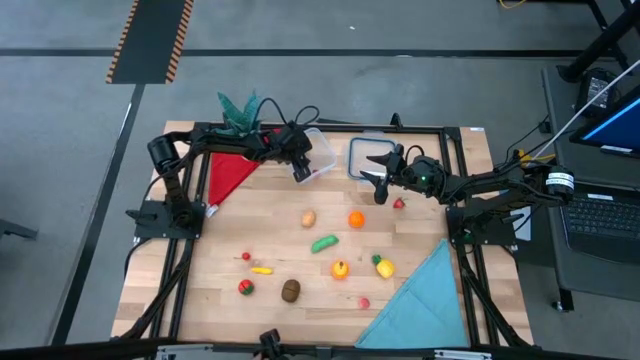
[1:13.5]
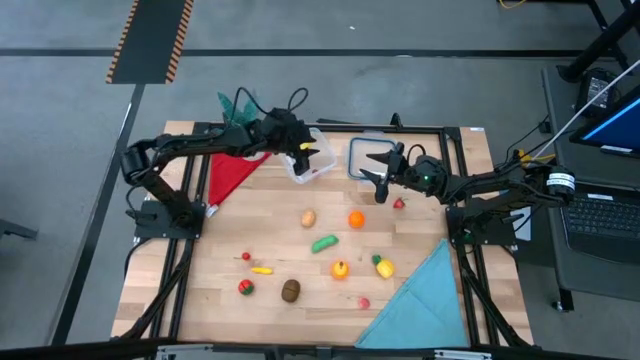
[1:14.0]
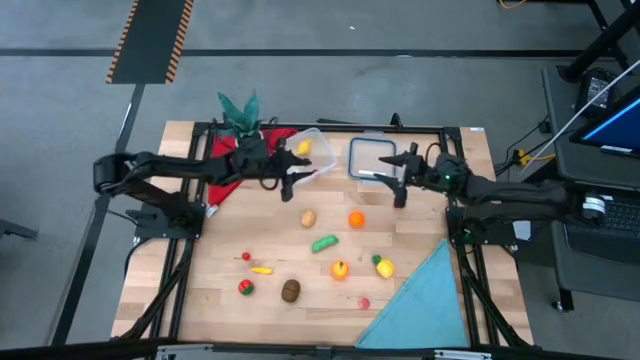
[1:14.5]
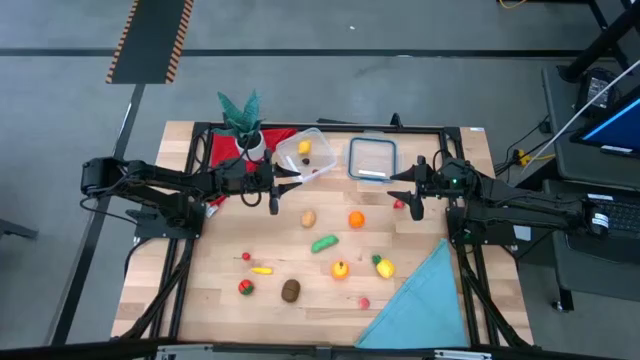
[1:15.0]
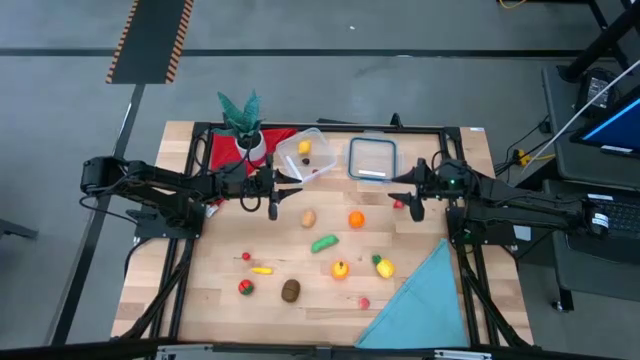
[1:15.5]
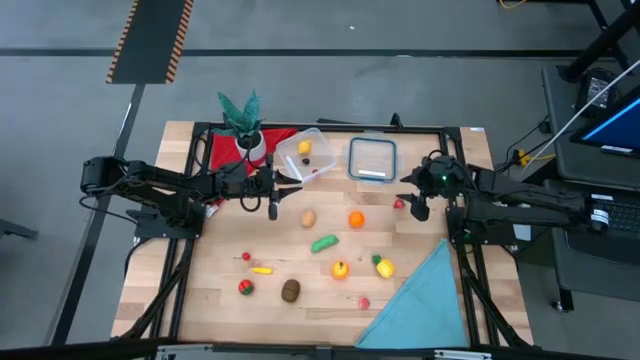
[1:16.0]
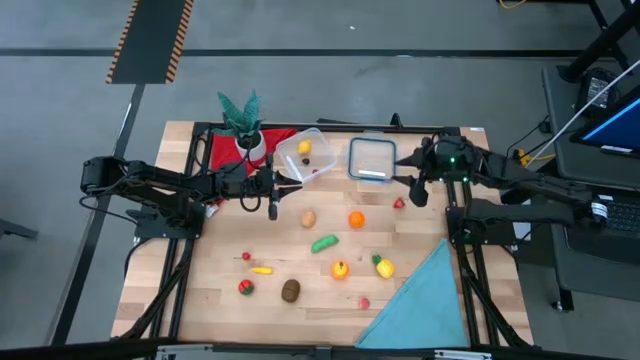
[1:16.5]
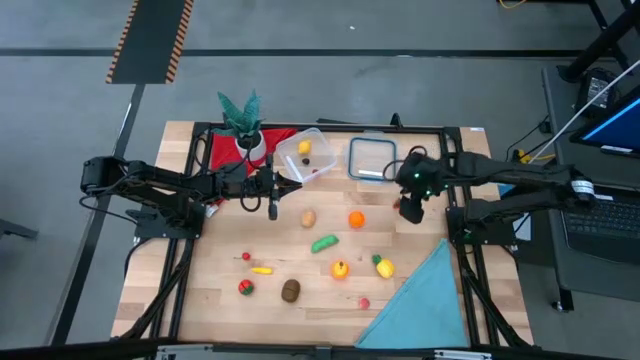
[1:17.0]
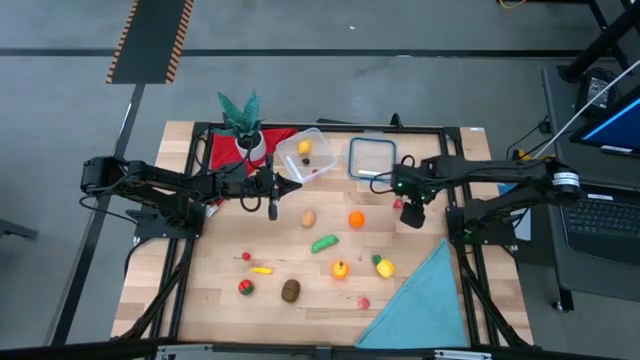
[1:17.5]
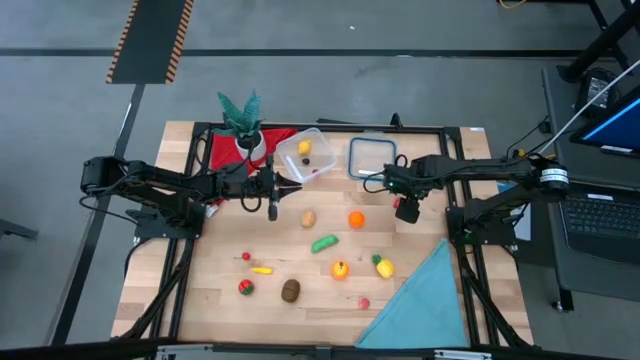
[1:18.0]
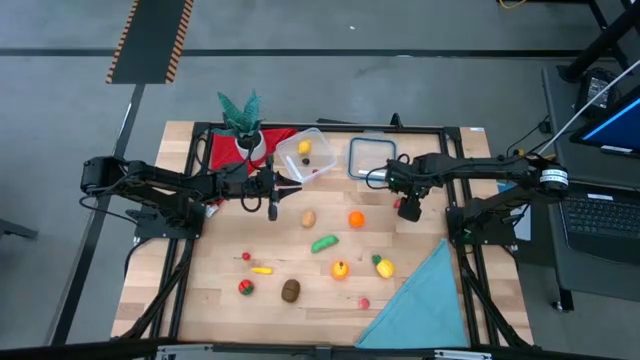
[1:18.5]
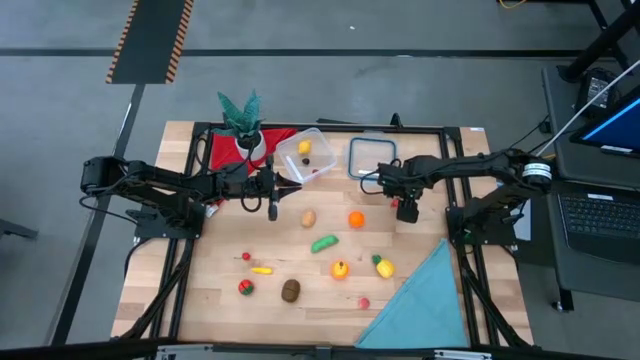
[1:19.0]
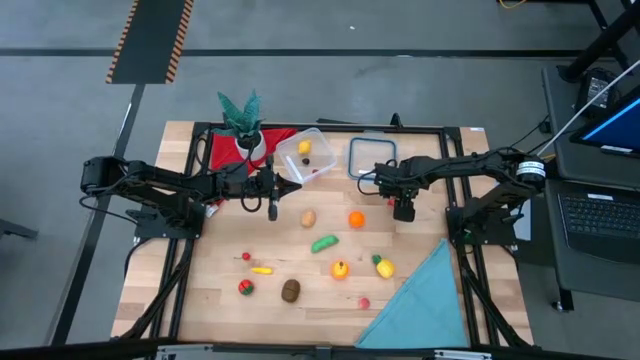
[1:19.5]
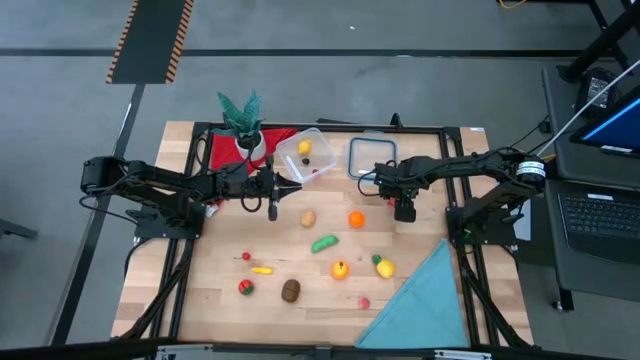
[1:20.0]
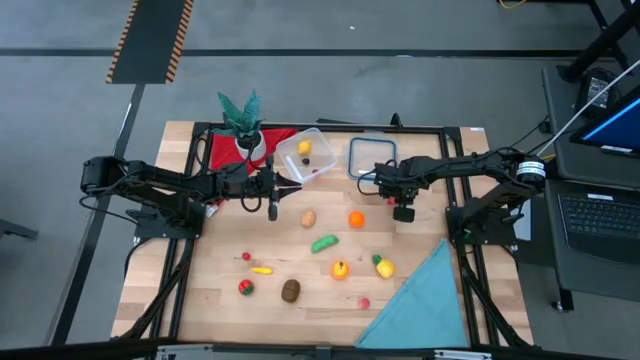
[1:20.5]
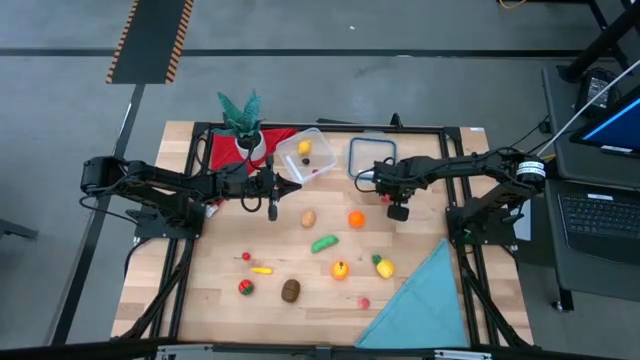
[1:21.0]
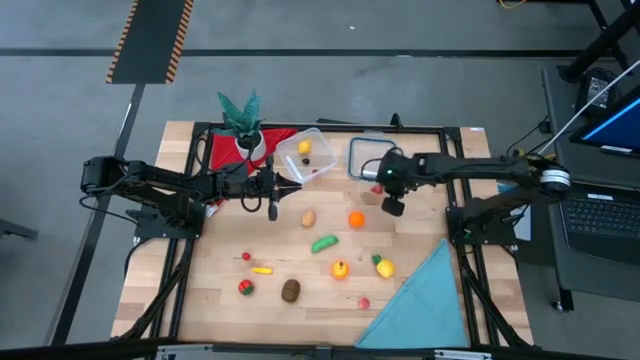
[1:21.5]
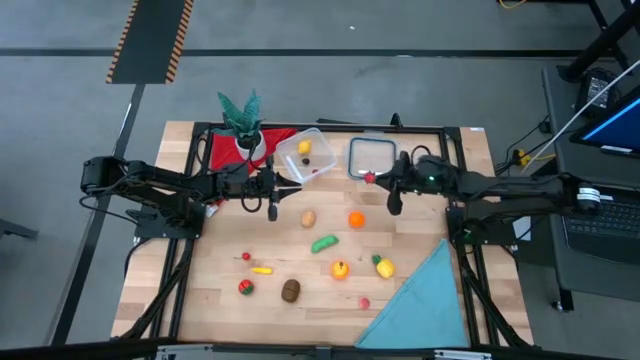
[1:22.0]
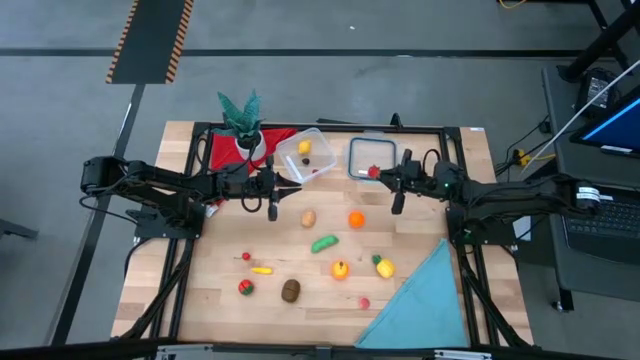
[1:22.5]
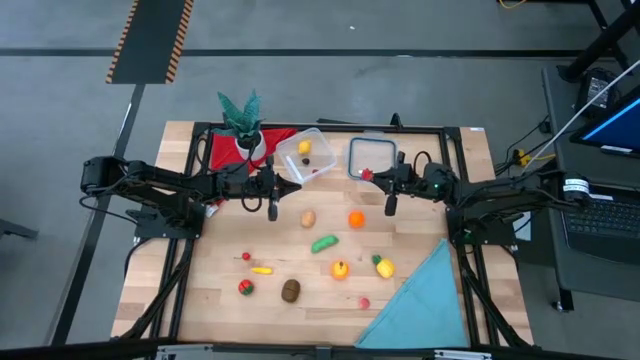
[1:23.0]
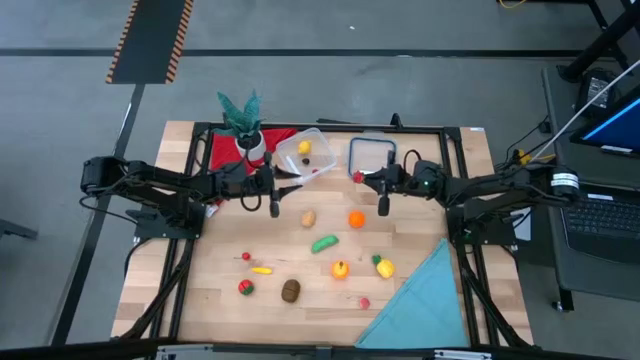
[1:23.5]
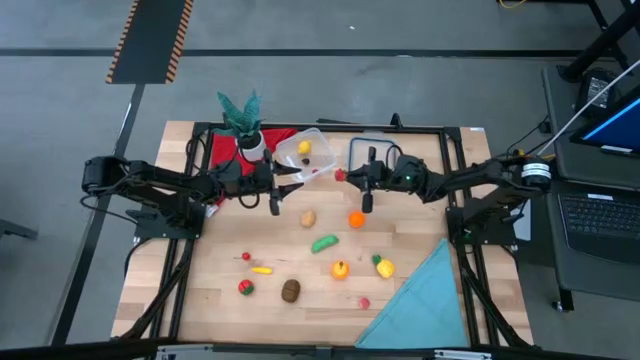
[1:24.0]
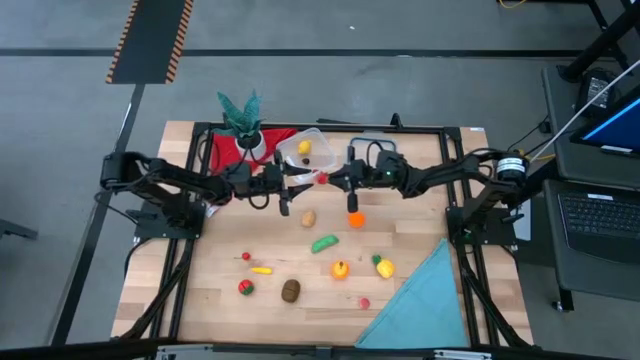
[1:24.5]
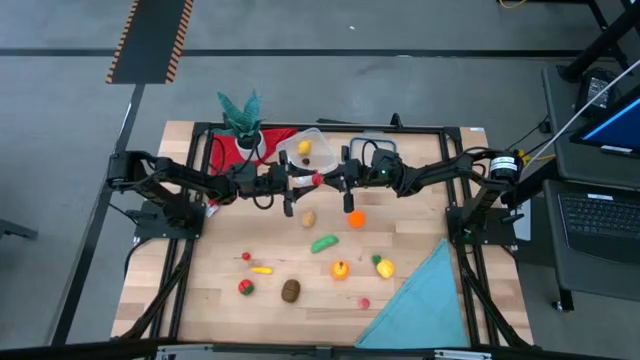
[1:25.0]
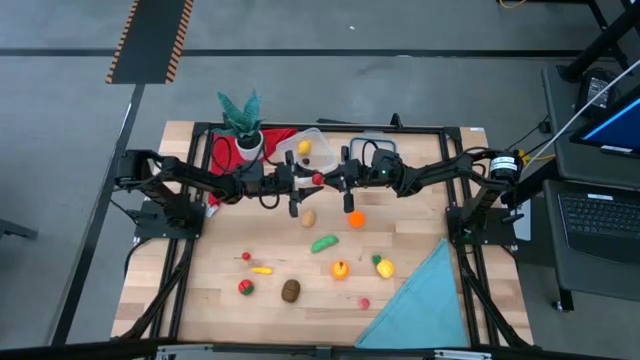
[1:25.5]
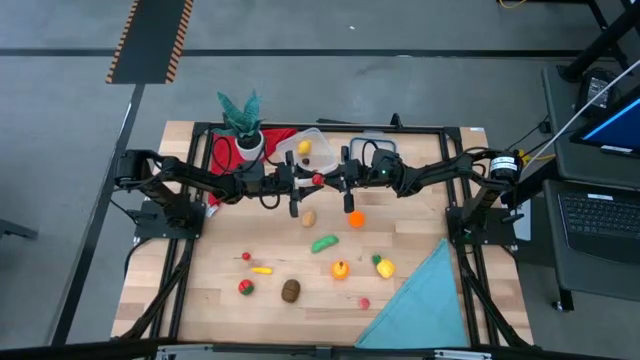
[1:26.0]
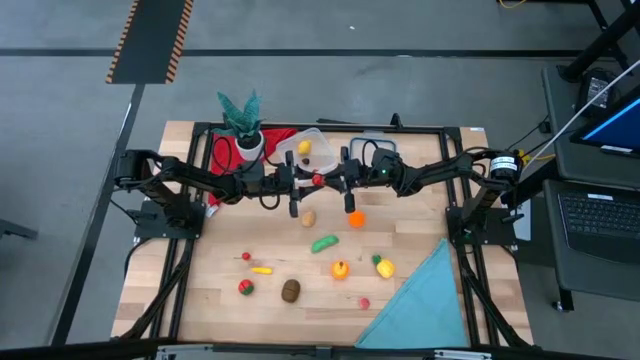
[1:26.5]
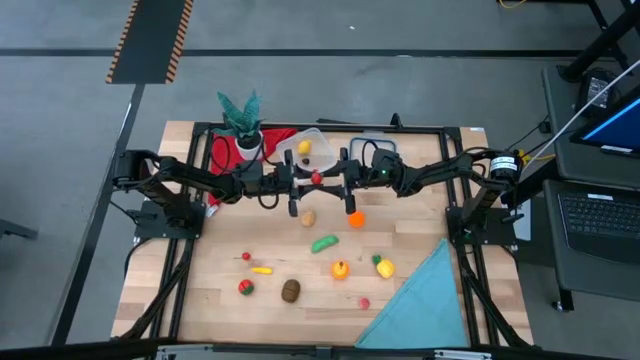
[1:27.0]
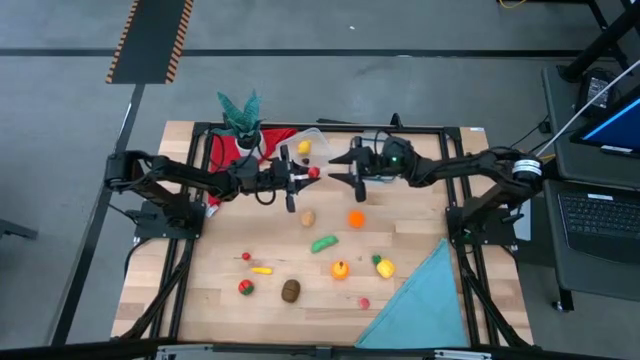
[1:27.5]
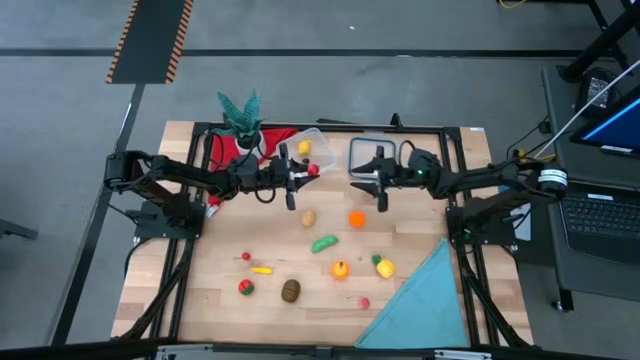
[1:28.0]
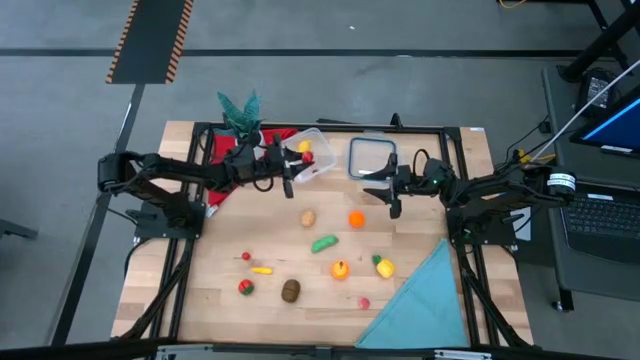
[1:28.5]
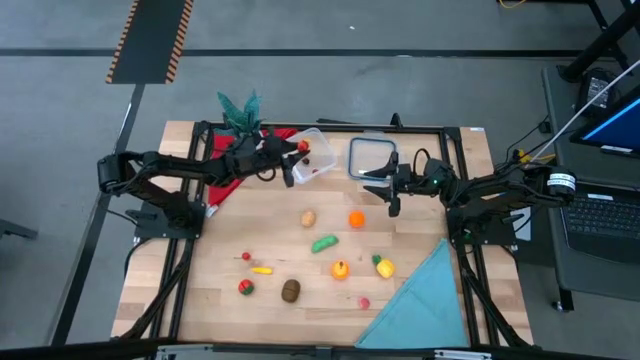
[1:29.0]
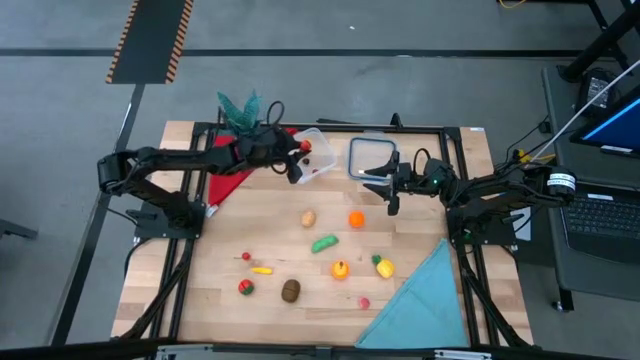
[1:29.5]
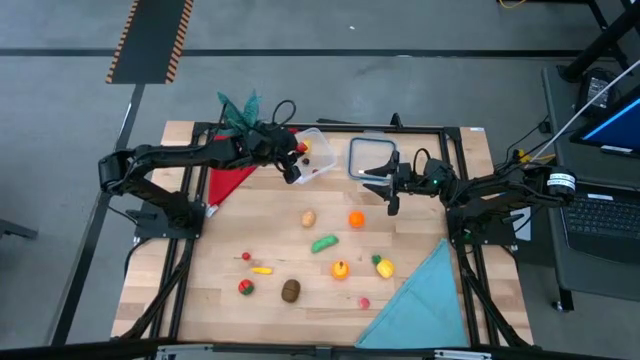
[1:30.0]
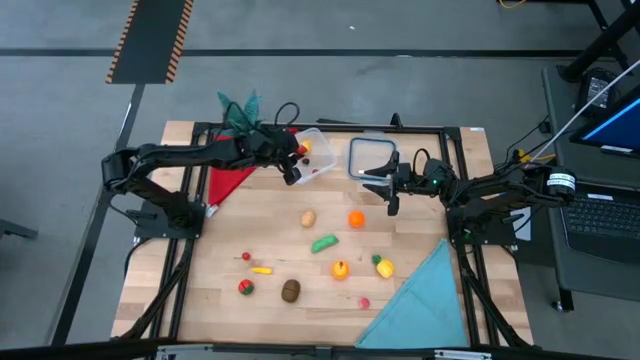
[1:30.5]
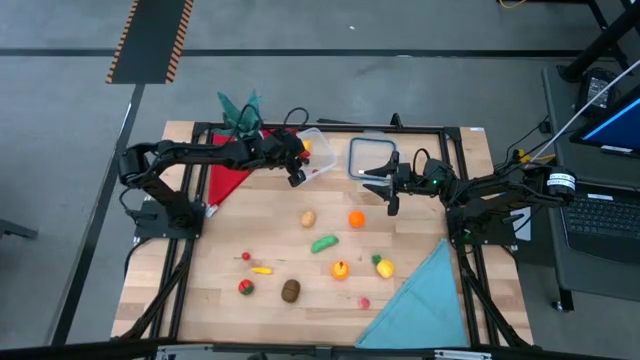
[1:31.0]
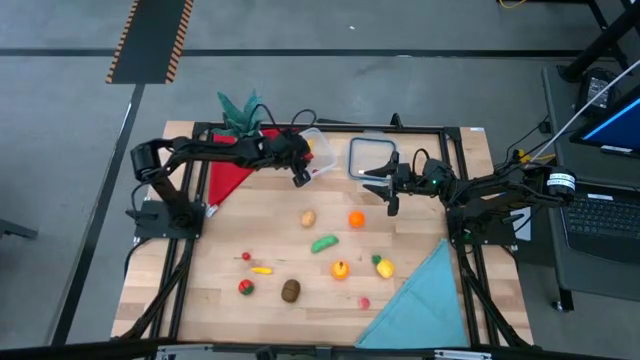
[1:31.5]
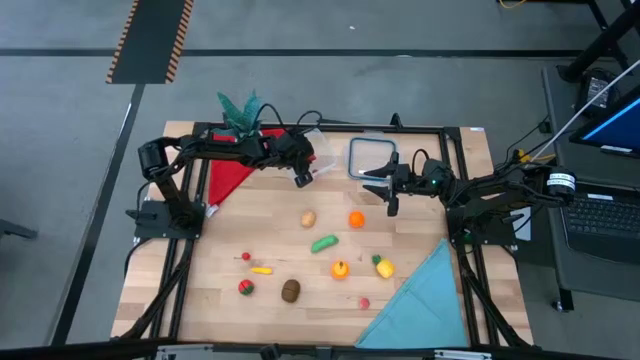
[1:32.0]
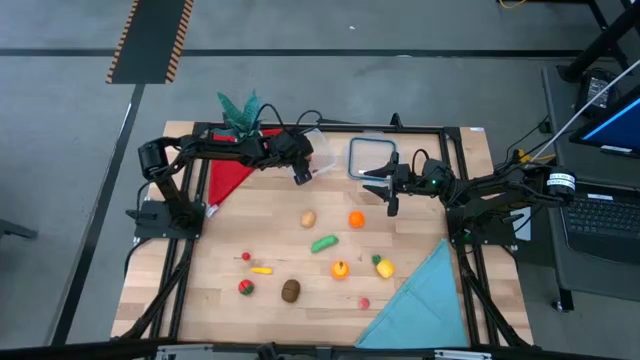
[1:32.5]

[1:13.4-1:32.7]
Task: Pick and placing Produce into tupperware
Put the strawberry into the transparent bin

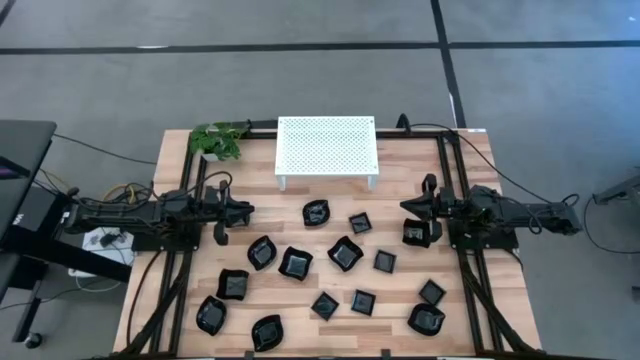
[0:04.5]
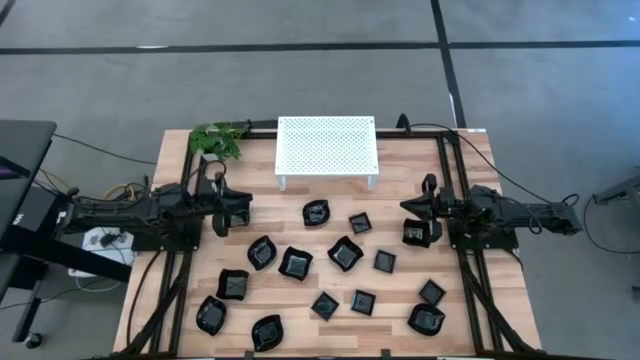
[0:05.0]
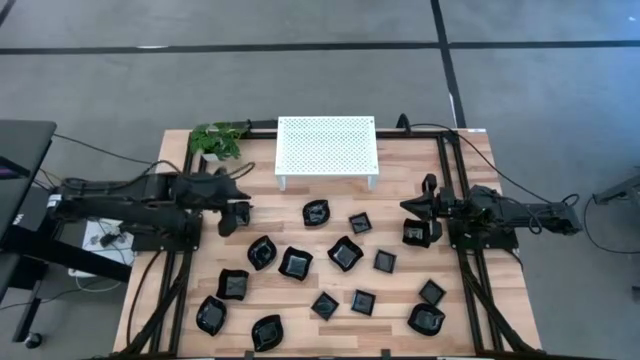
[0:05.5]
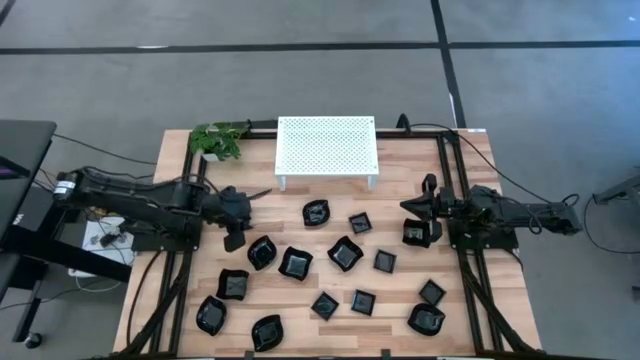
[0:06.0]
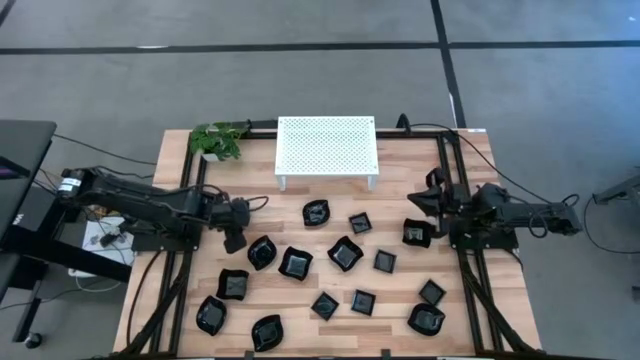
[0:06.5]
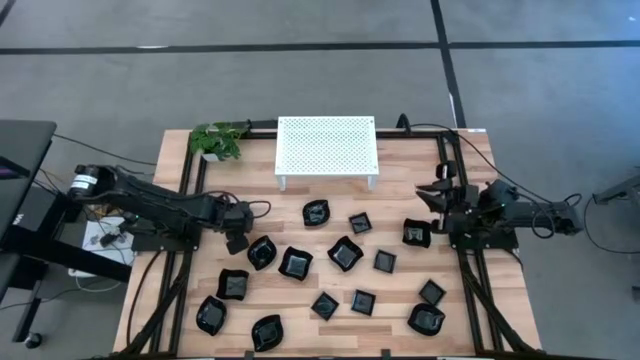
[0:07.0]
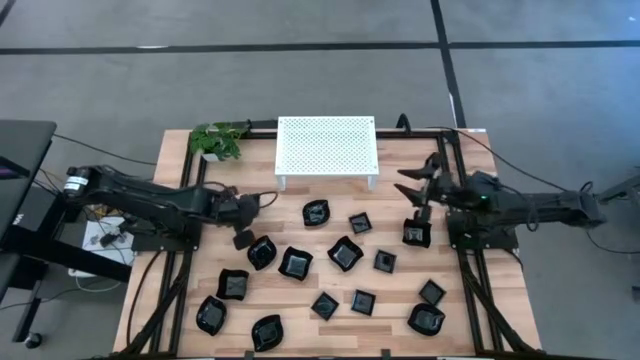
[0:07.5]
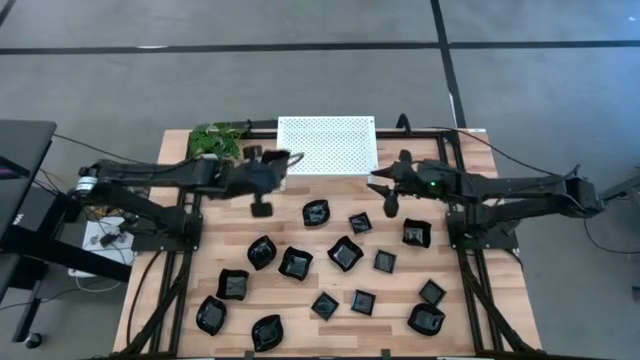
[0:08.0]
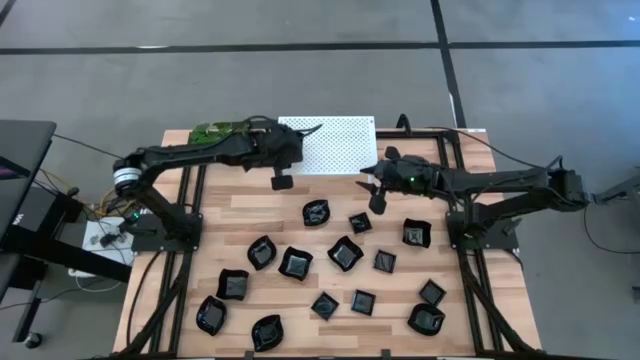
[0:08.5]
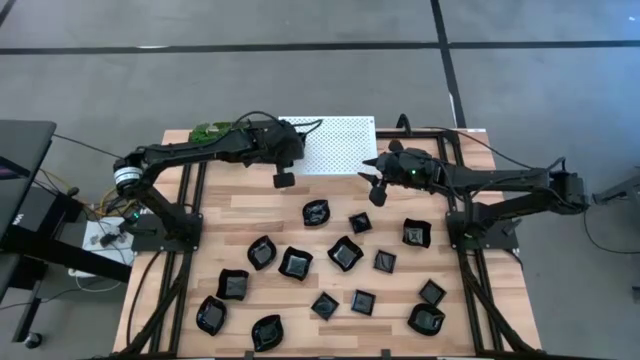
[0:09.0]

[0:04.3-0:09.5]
Task: Pick & Place Mini shaped plates
Put the black distorted square plate on the shelf
